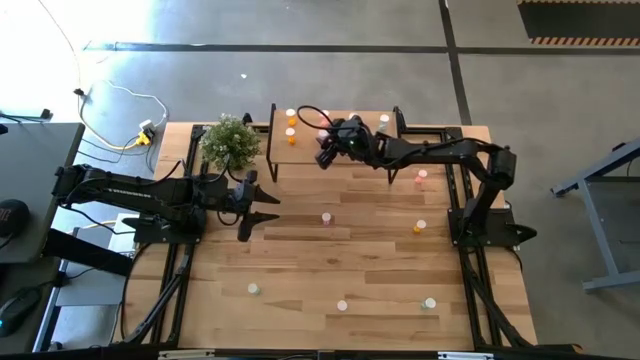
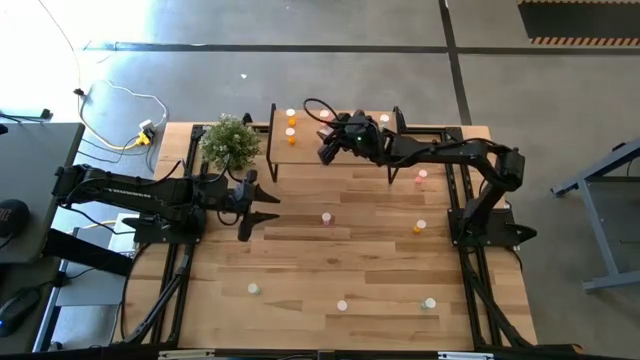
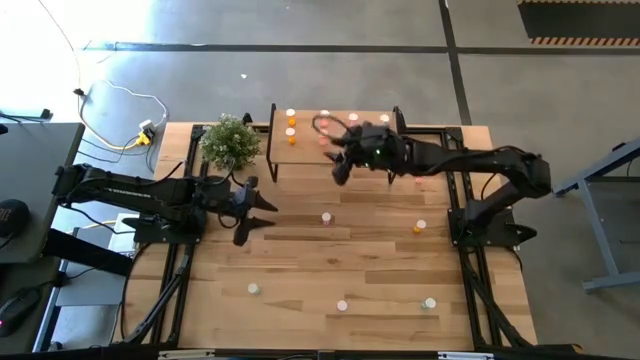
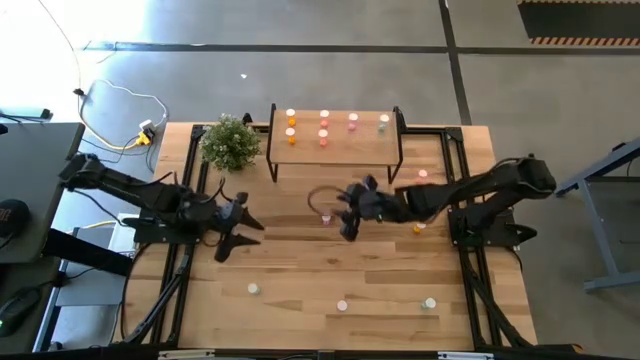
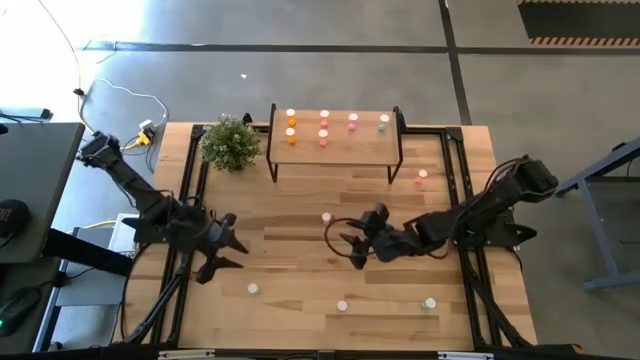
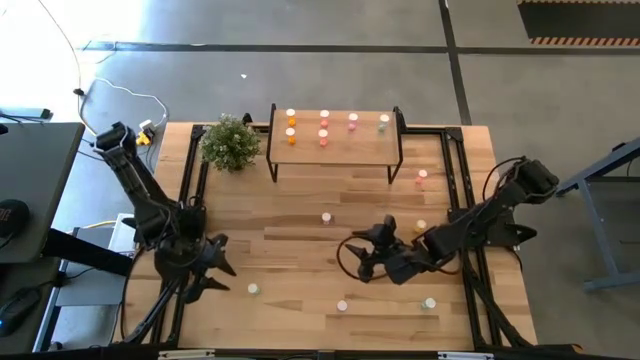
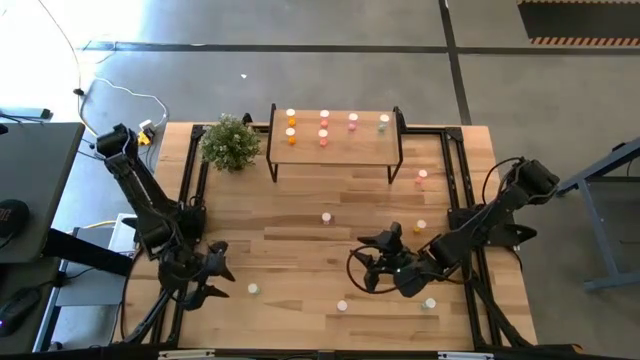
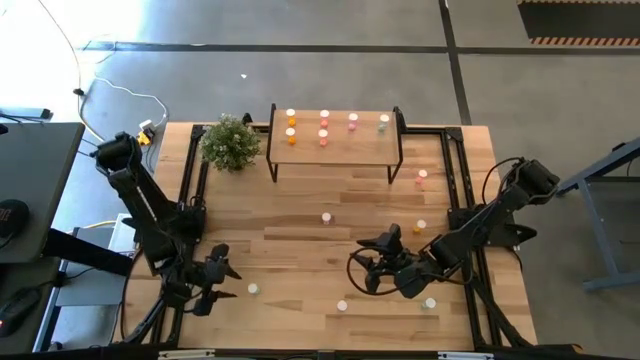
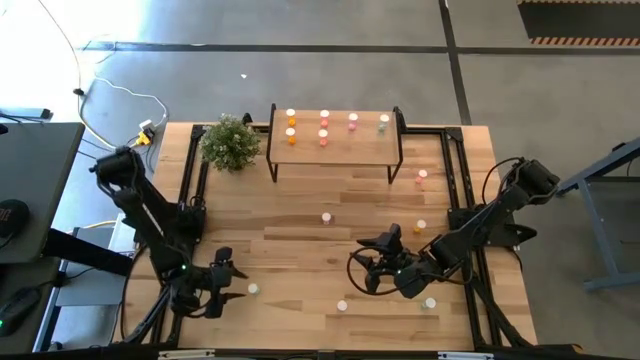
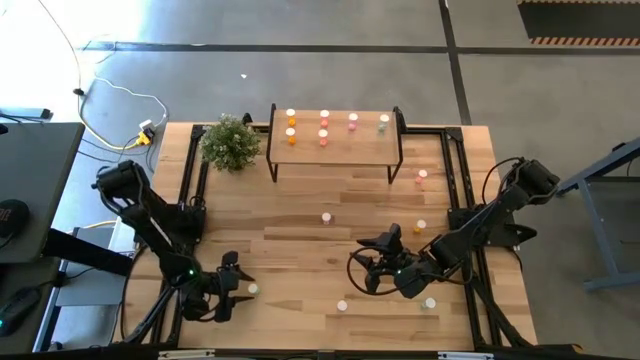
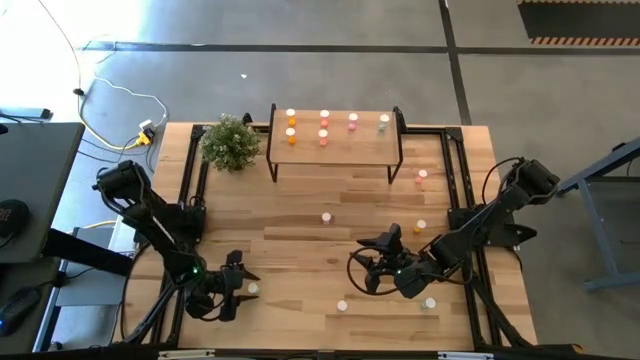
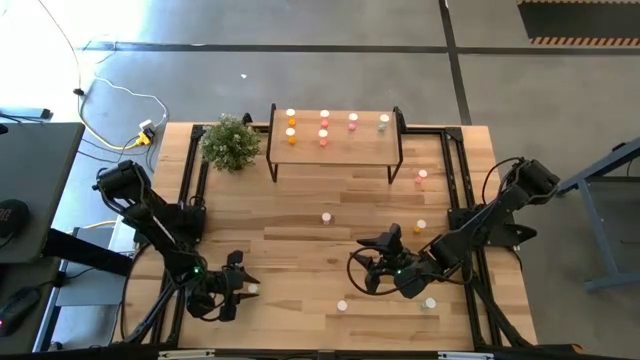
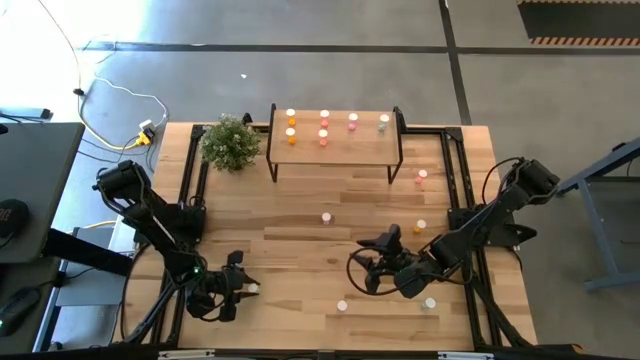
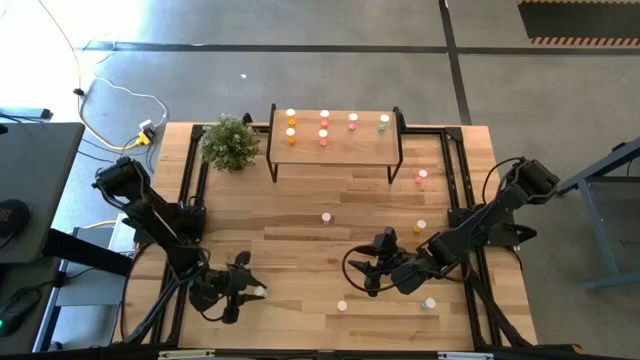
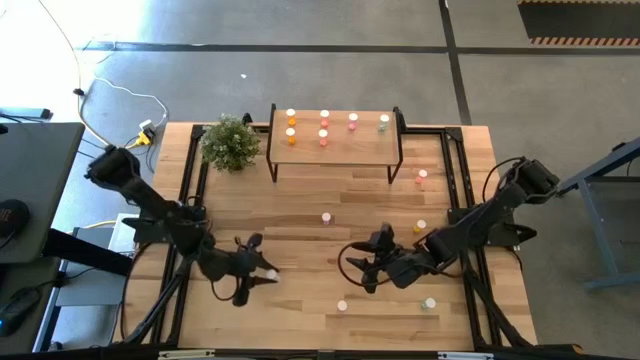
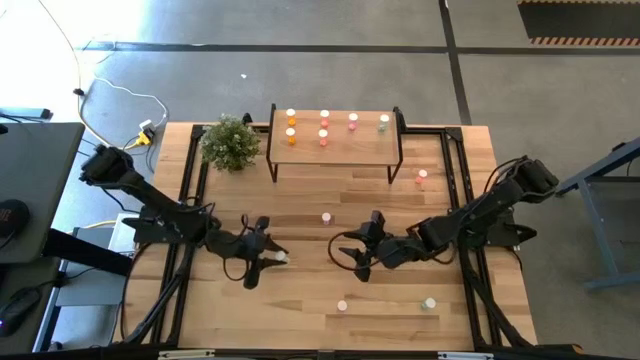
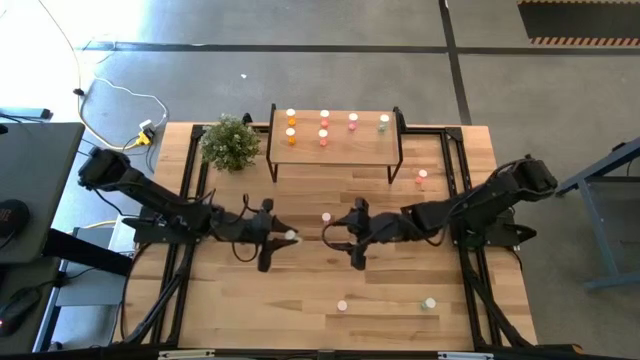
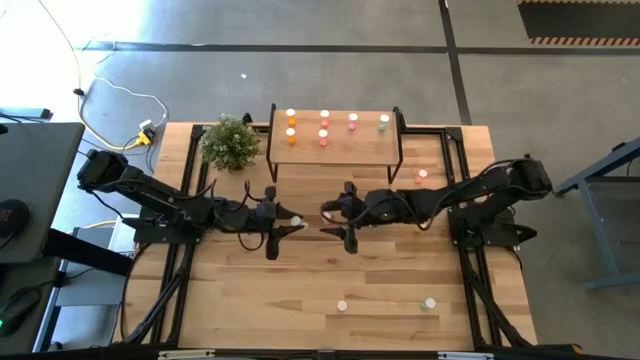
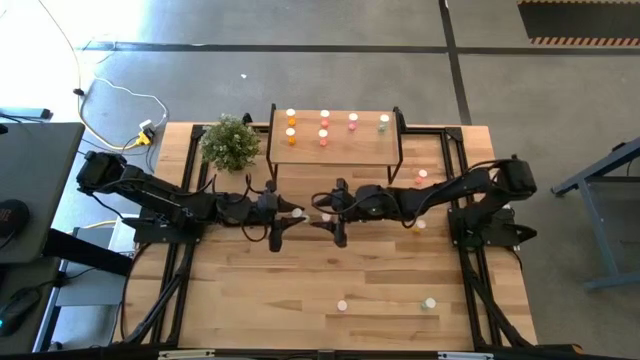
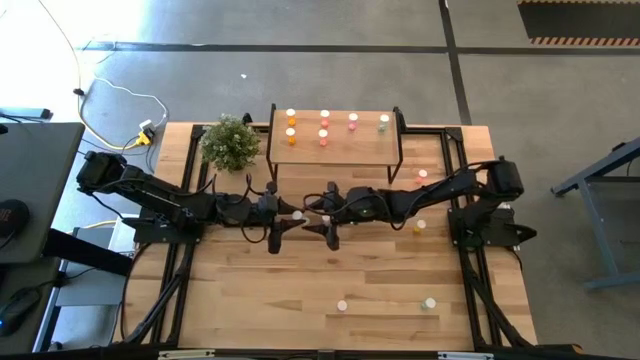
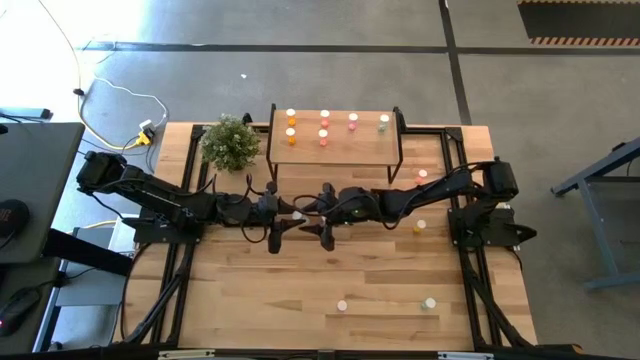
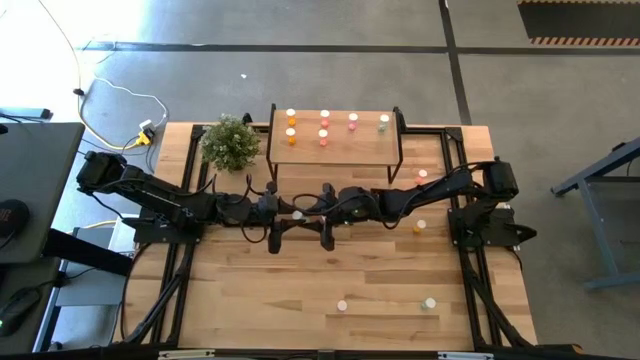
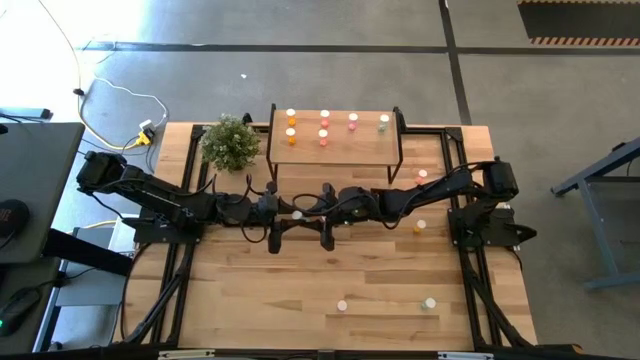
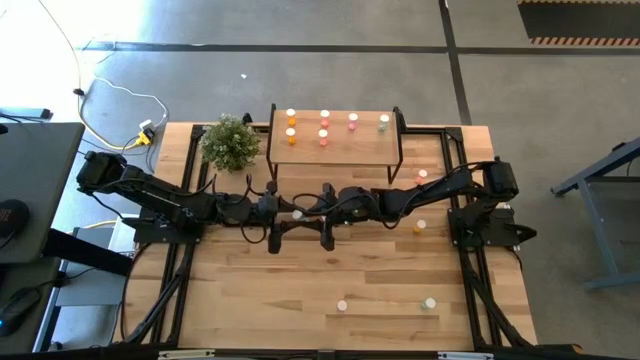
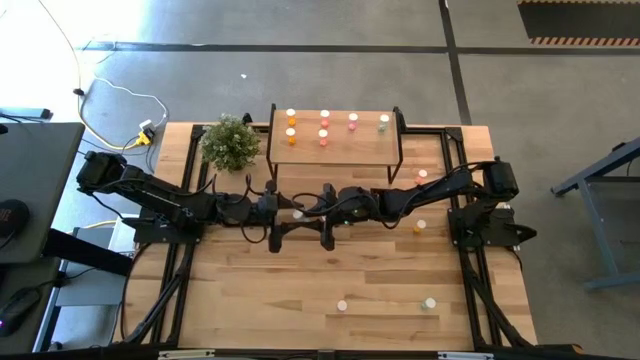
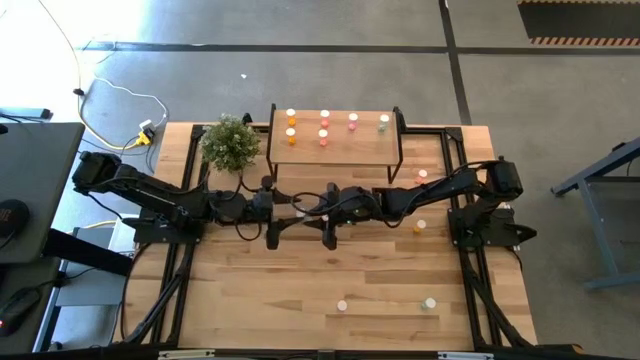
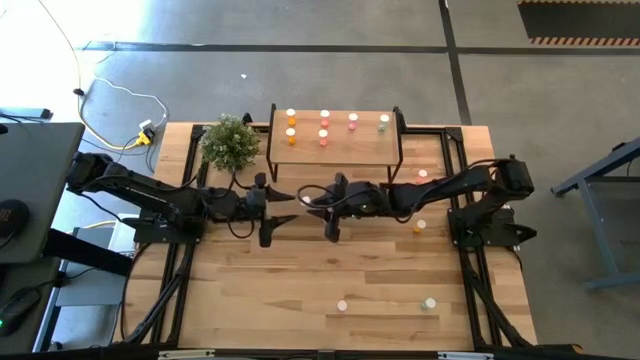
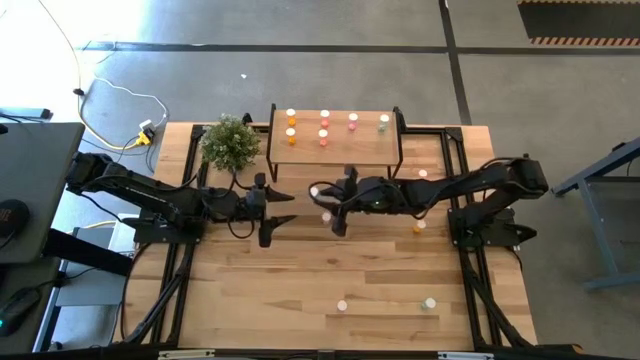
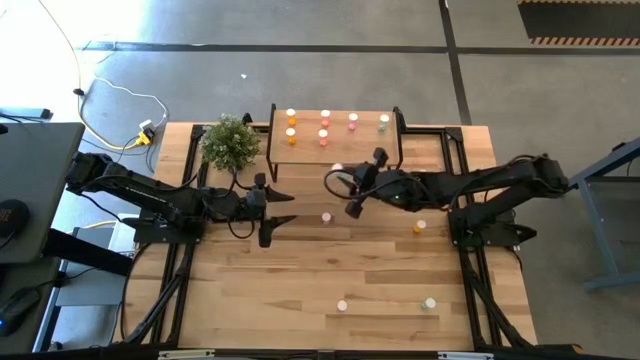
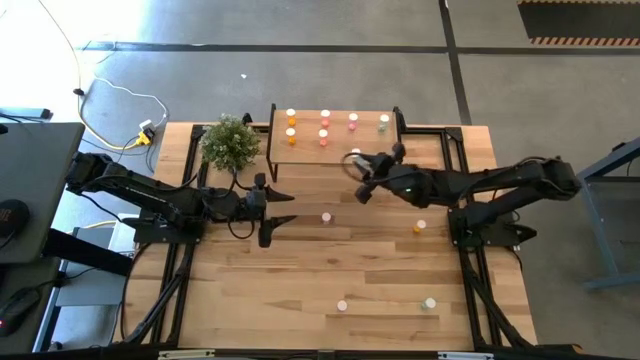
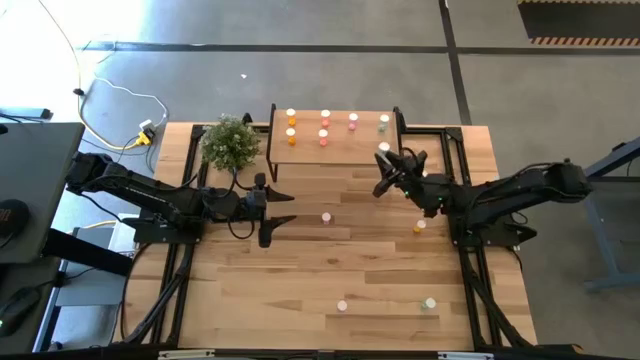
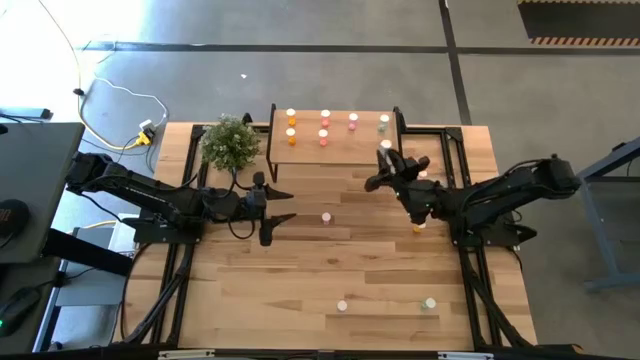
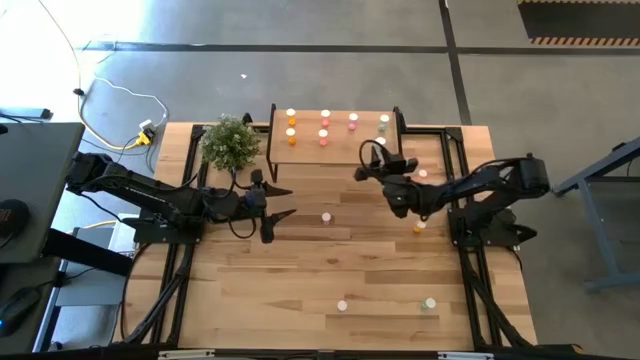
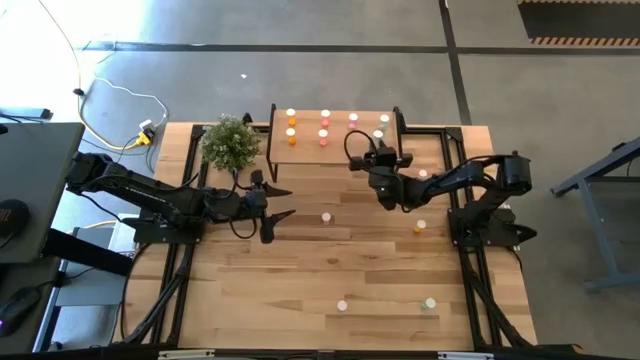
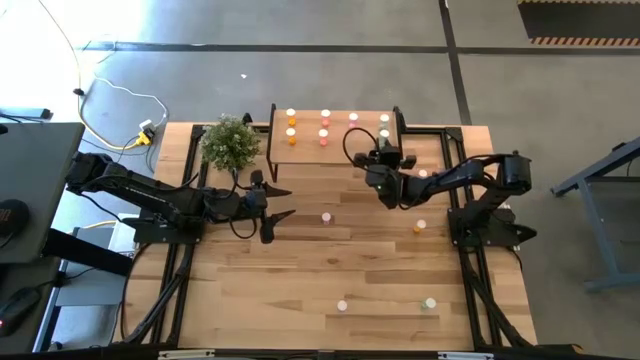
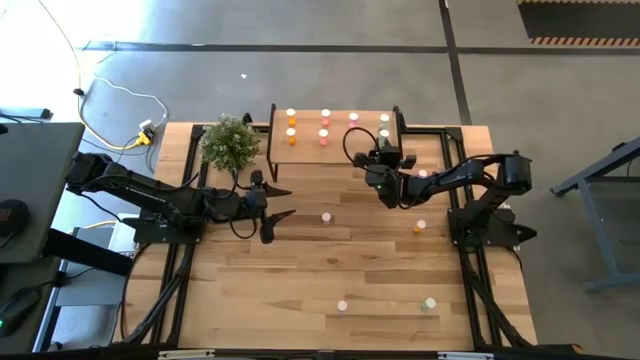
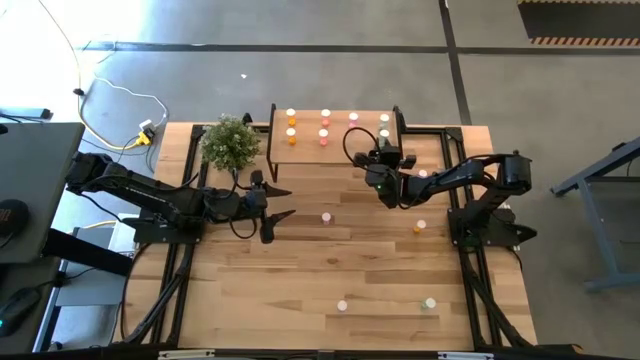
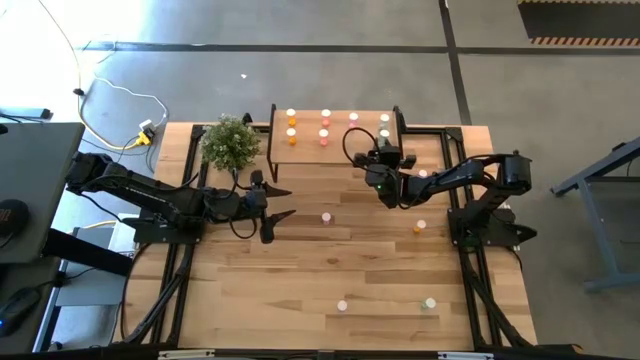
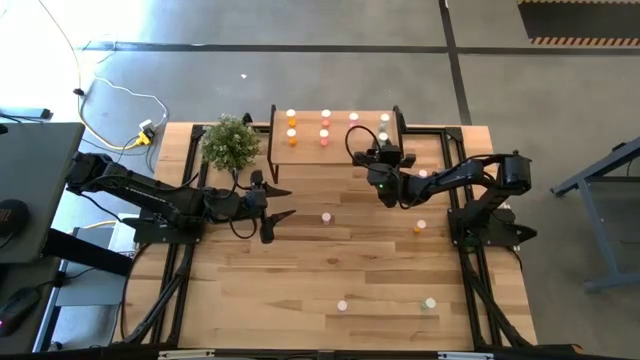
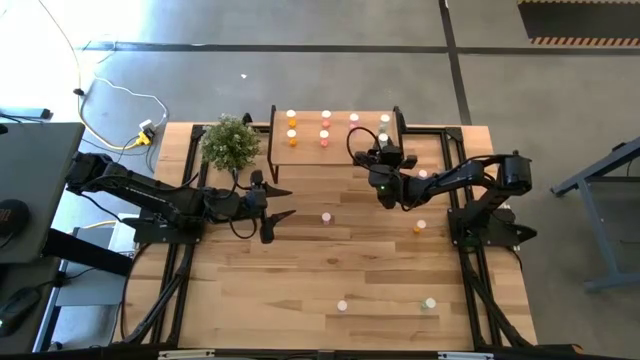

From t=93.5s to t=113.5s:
Task: Pick and place medicine bottles onto shelf by color
Put the left green pill bottle aligned with the other green pill bottle on the shelf

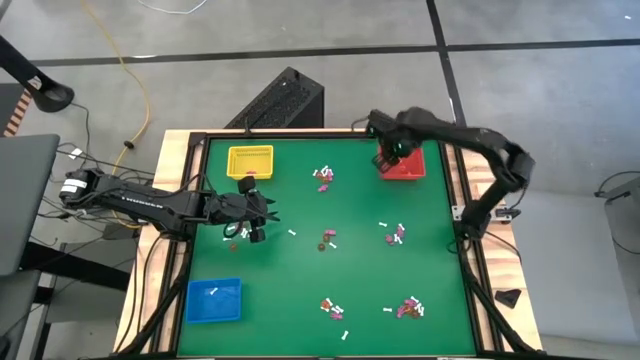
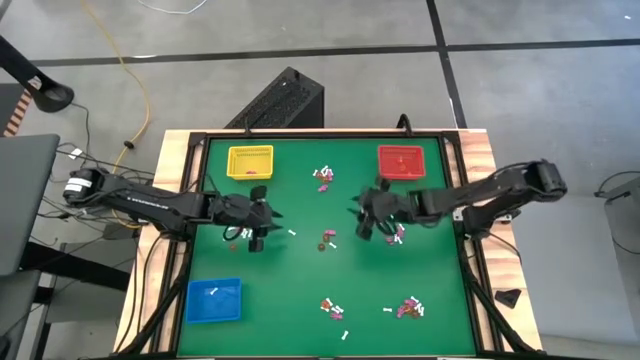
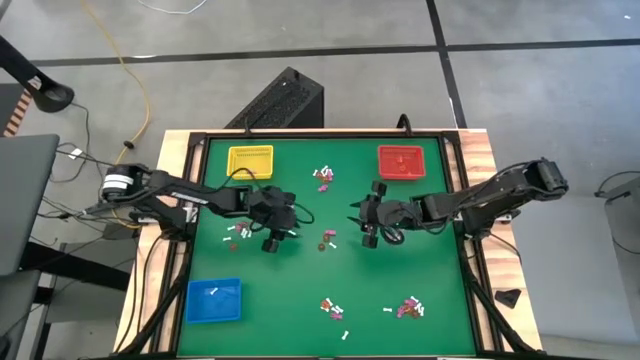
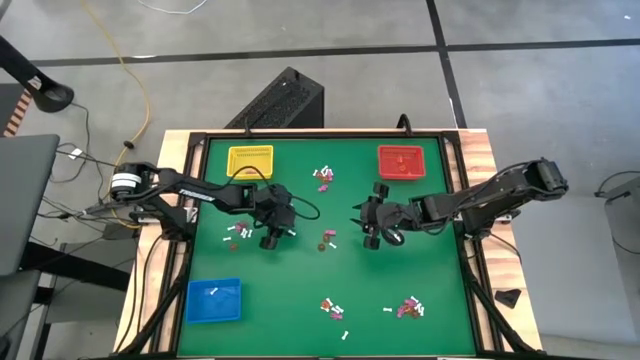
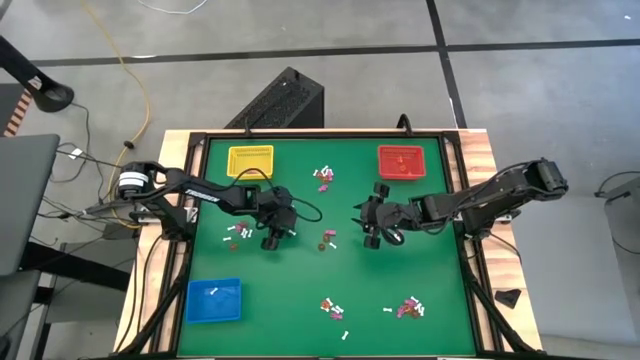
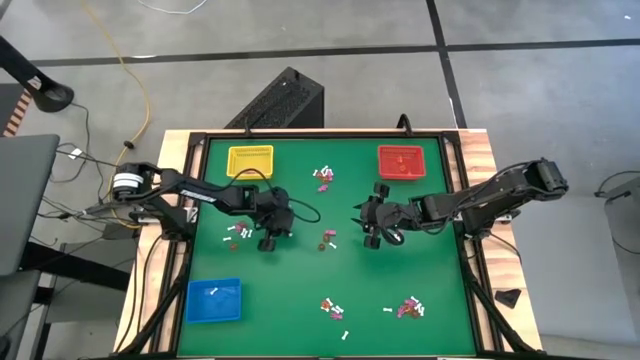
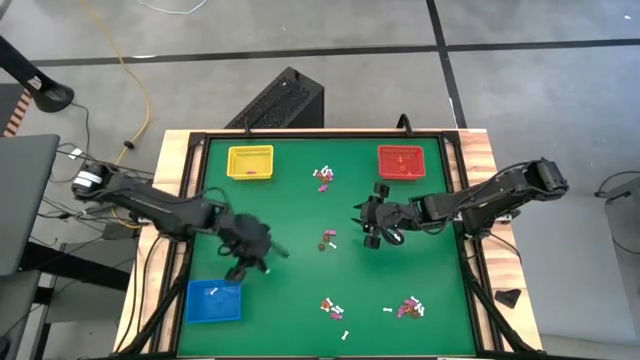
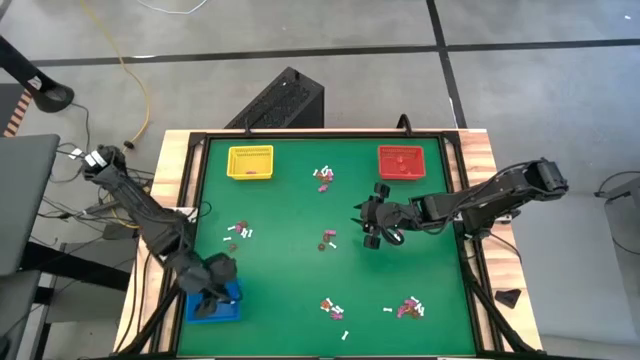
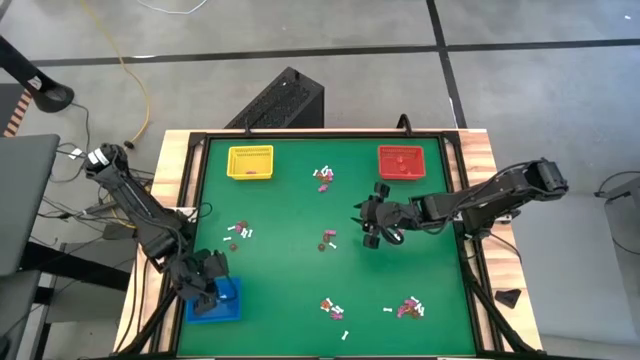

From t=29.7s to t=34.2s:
Task: Sort Halloween decoration
Put the white bone toy into the blue bin
